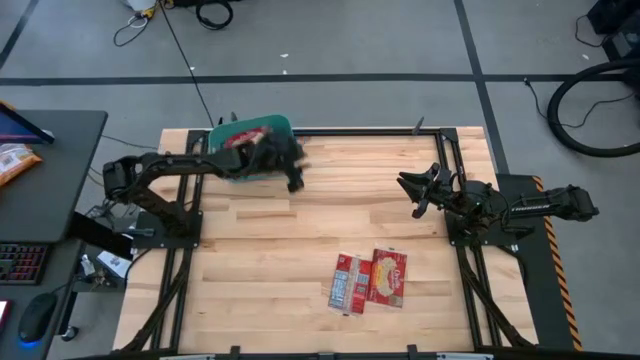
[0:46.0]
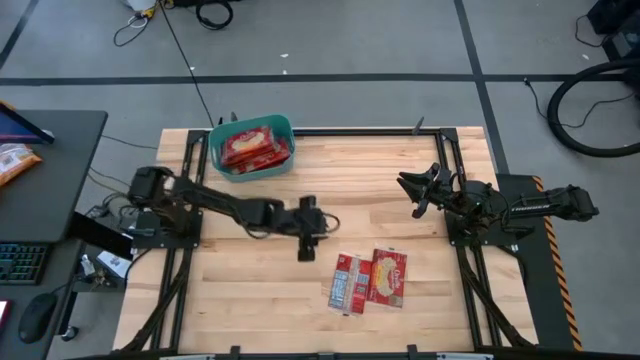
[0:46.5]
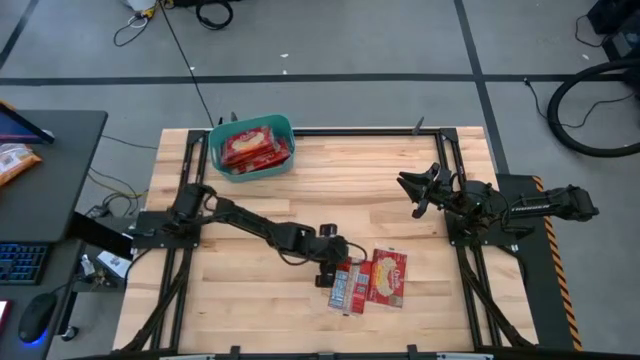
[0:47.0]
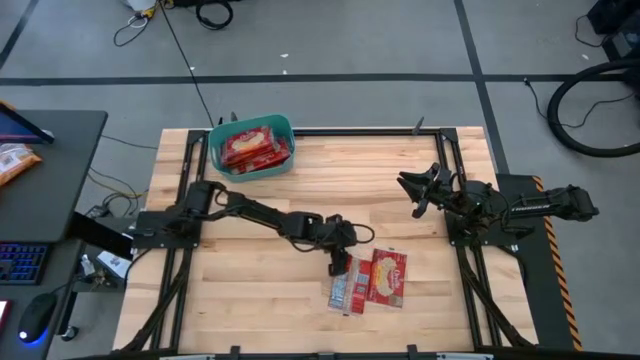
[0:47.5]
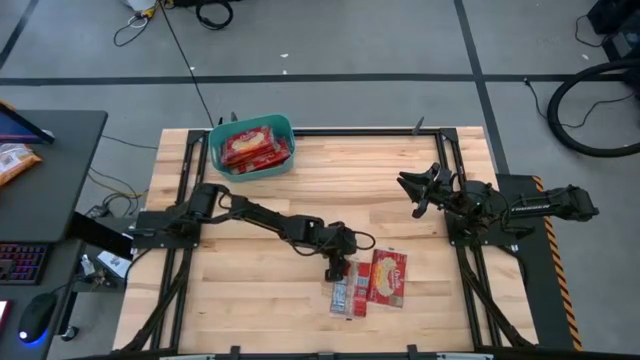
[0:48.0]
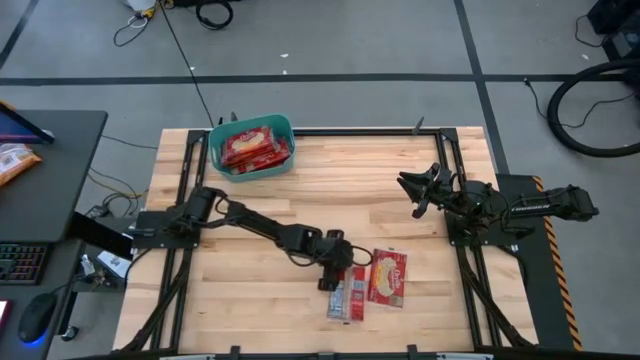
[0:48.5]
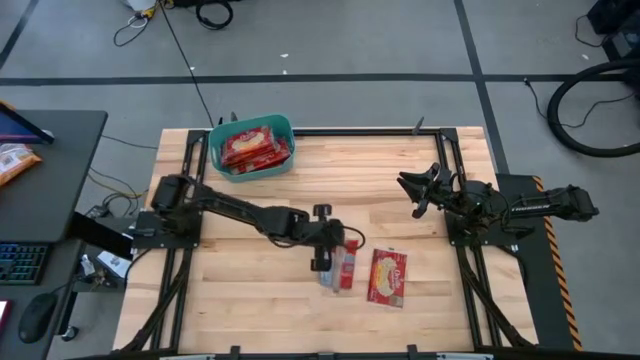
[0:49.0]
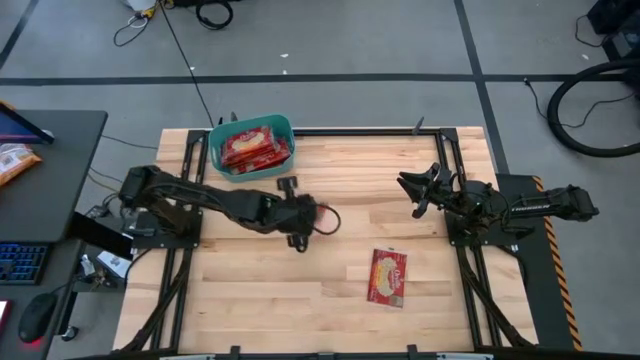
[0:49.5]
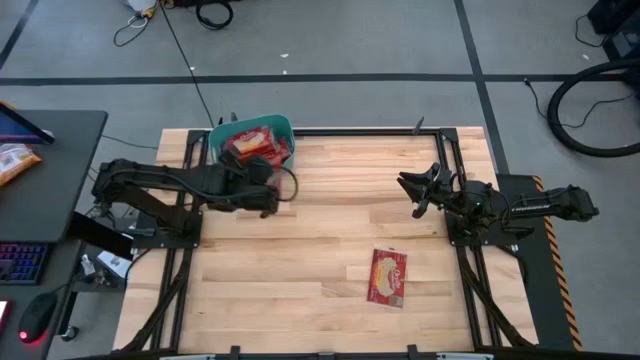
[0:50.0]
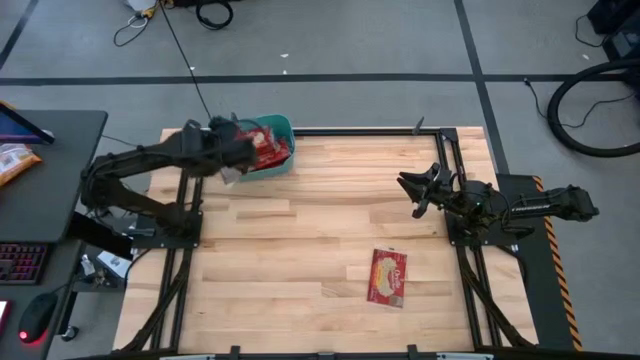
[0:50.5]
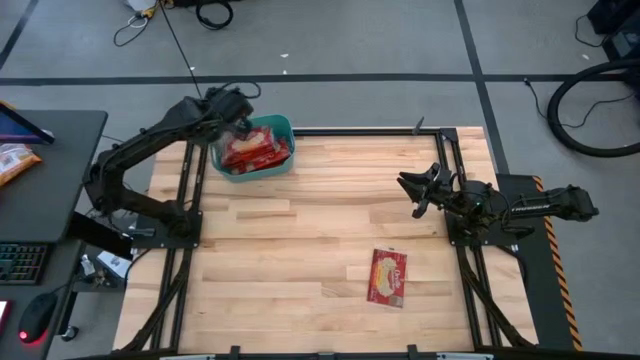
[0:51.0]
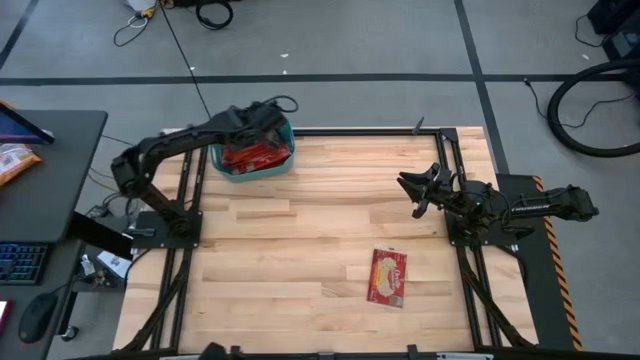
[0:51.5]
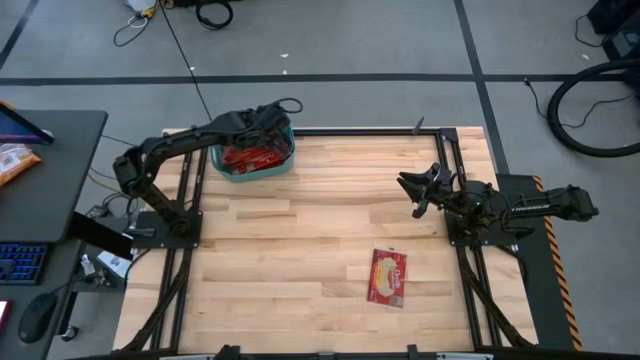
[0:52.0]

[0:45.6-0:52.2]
Task: Sort popcorn bags into baskets
Put the red popcorn bag into the blue bin

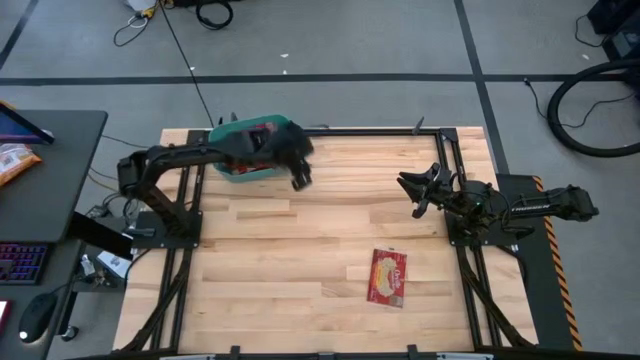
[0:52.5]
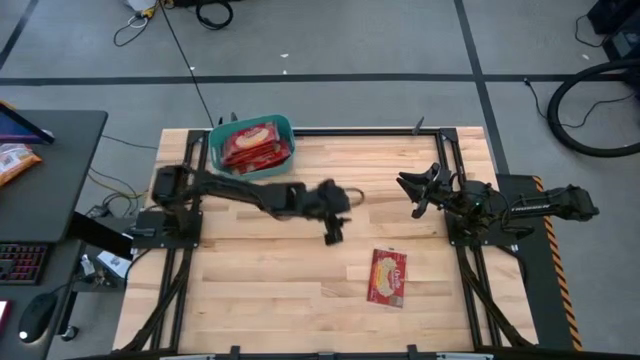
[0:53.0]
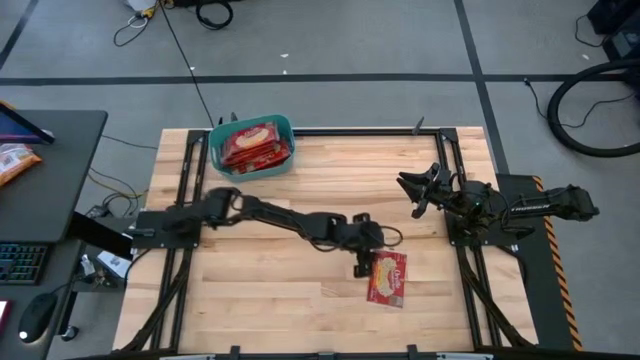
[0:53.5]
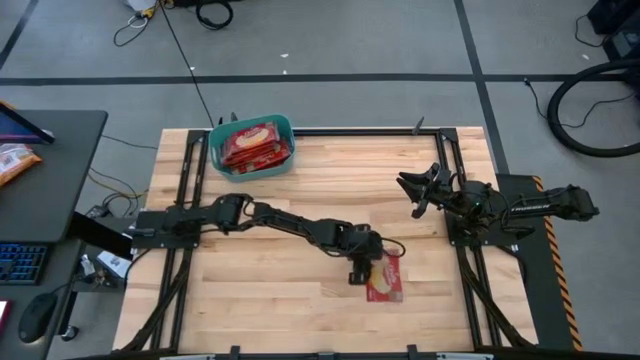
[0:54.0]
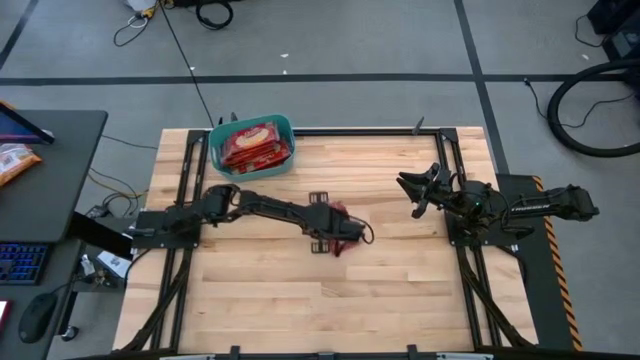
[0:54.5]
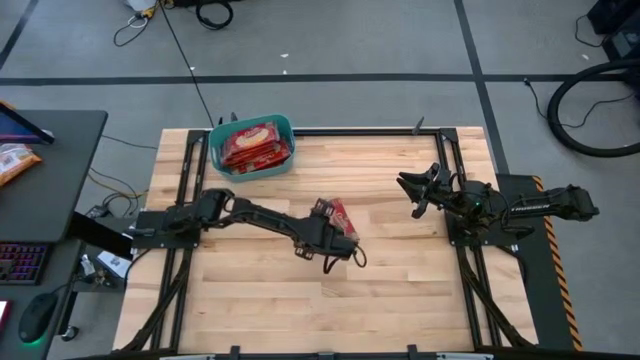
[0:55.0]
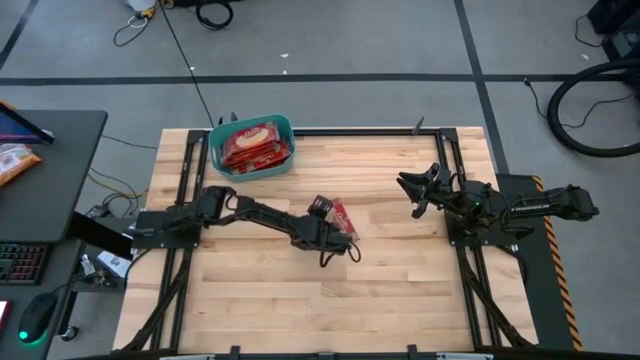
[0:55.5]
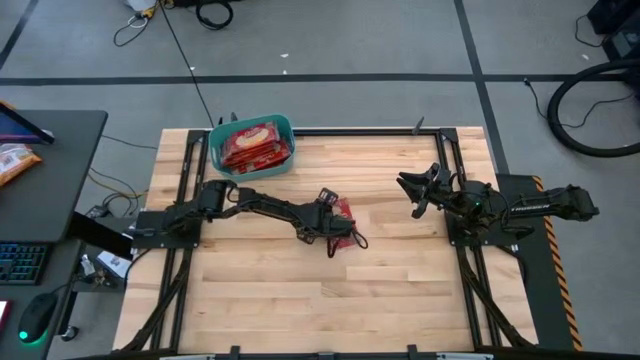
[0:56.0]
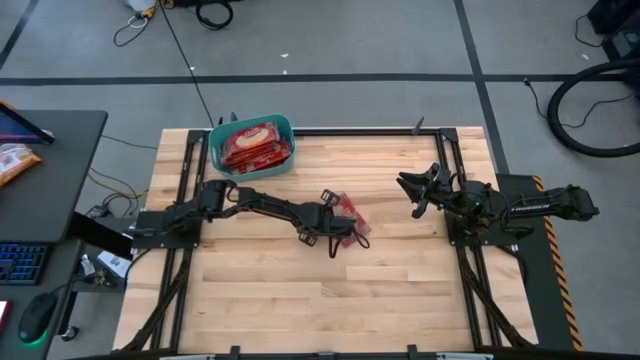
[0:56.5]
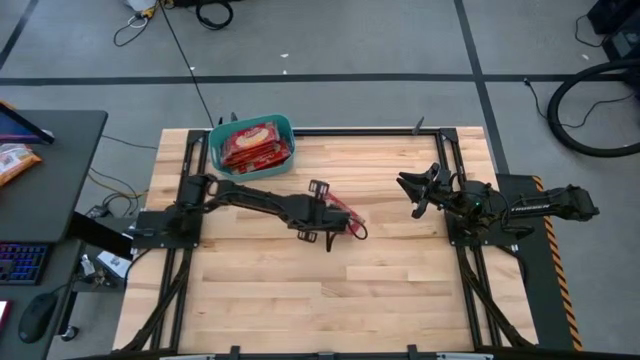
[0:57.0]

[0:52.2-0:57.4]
Put the red popcorn bag into the blue bin

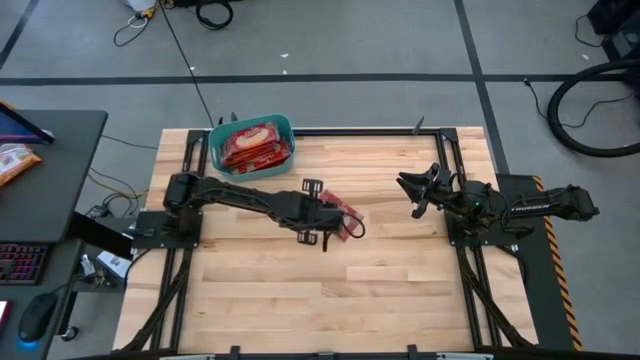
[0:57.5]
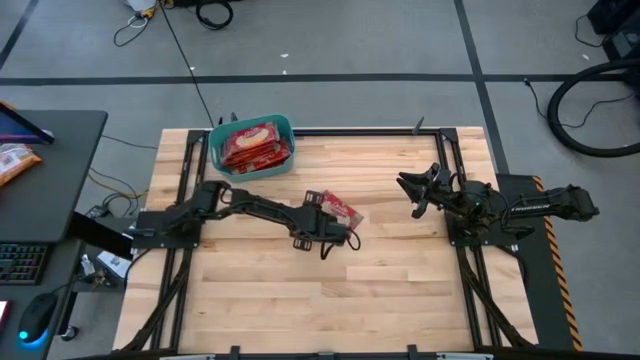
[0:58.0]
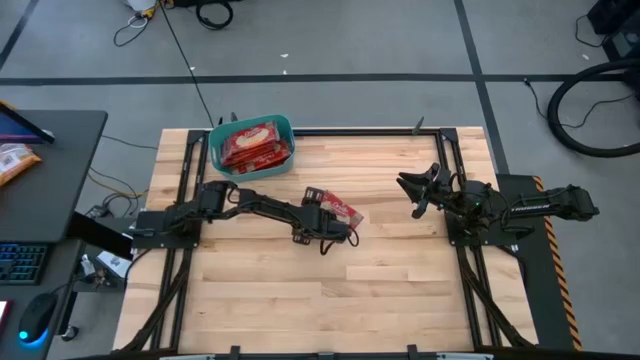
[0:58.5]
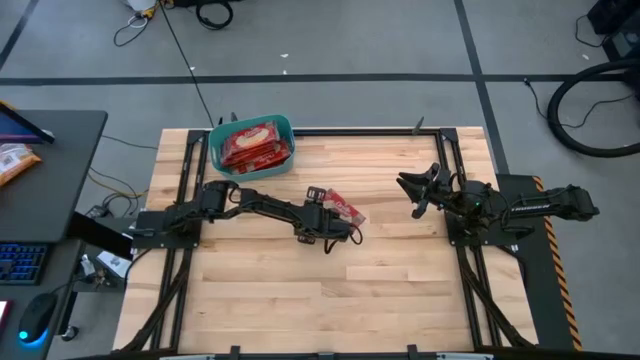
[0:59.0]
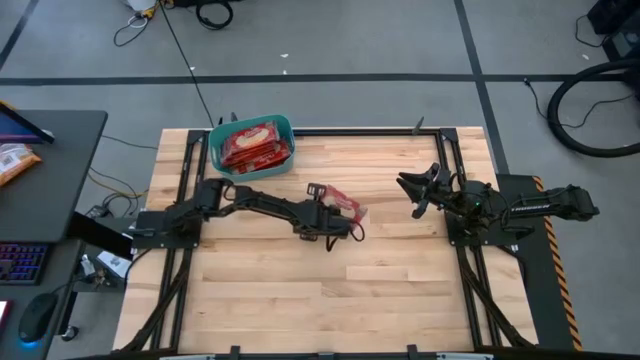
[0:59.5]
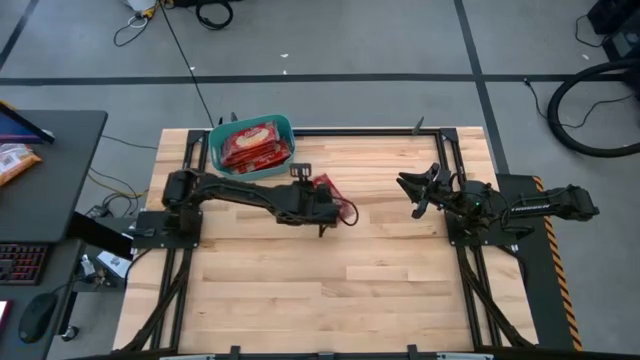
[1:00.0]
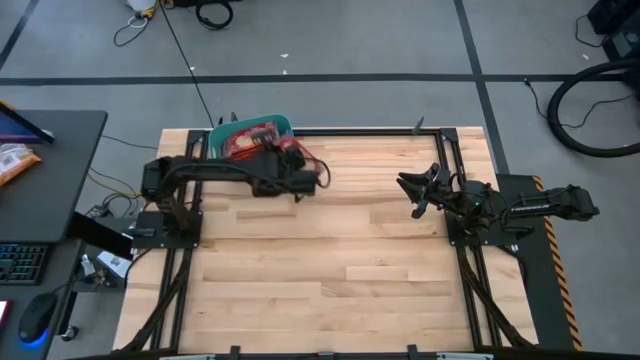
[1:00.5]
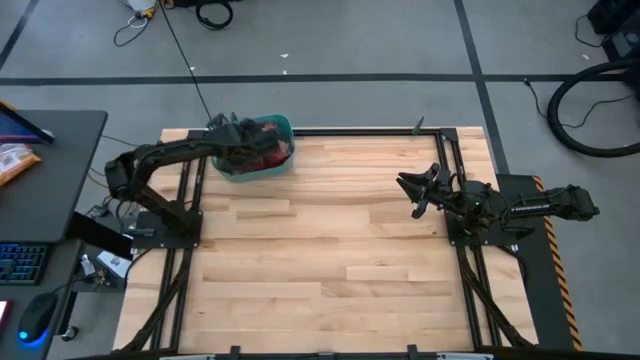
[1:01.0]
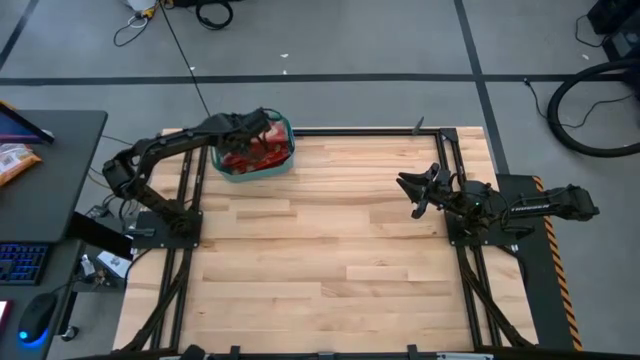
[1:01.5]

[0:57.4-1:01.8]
Put the red popcorn bag into the blue bin

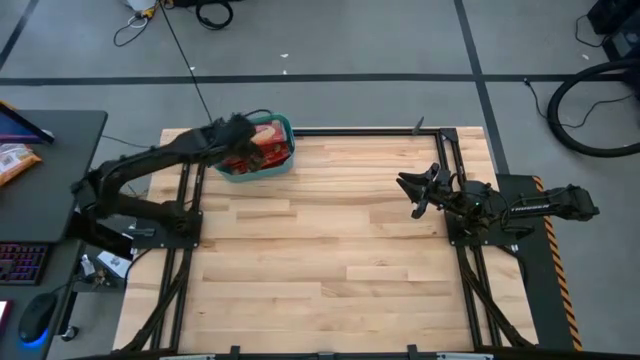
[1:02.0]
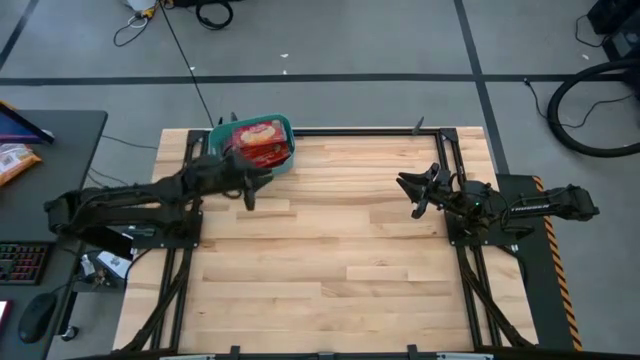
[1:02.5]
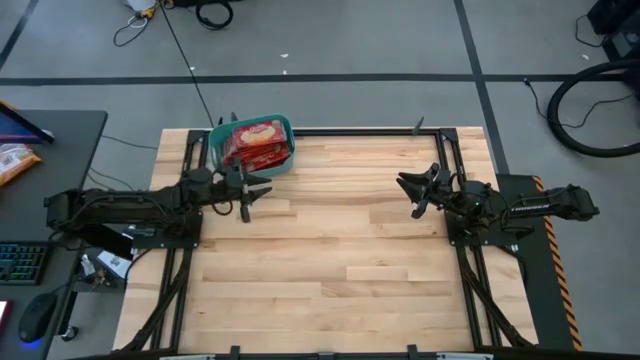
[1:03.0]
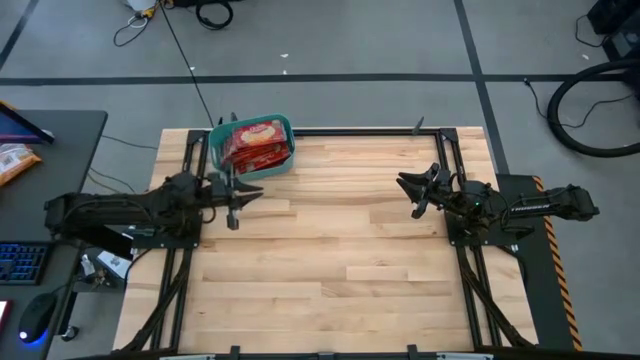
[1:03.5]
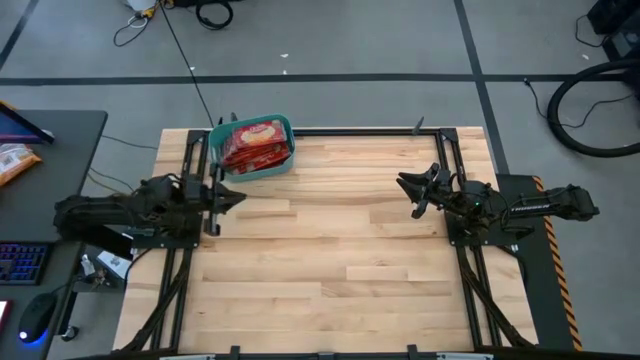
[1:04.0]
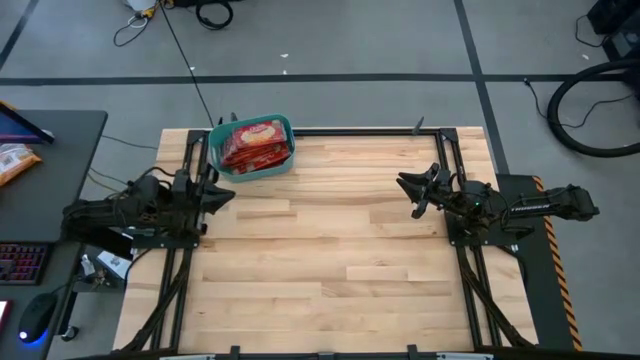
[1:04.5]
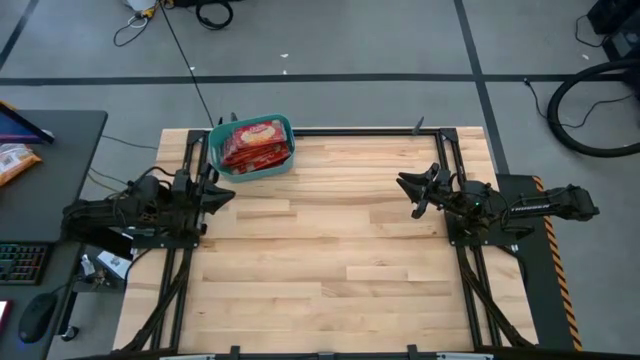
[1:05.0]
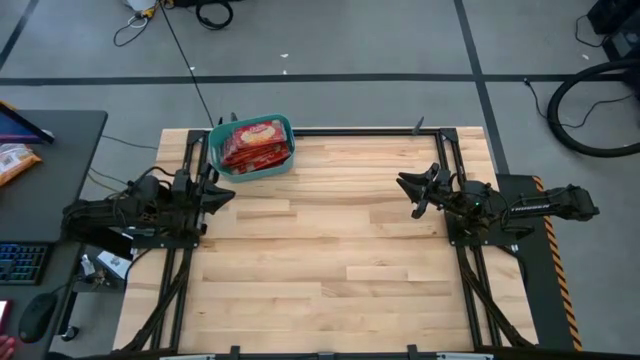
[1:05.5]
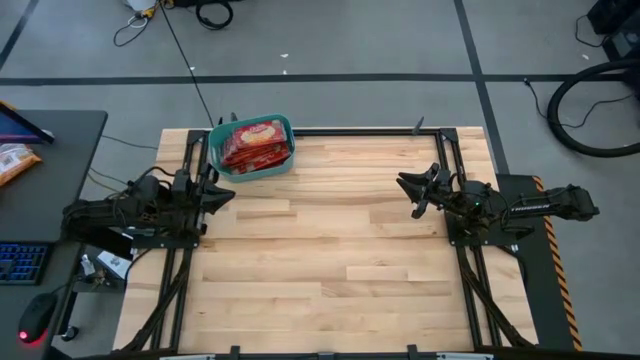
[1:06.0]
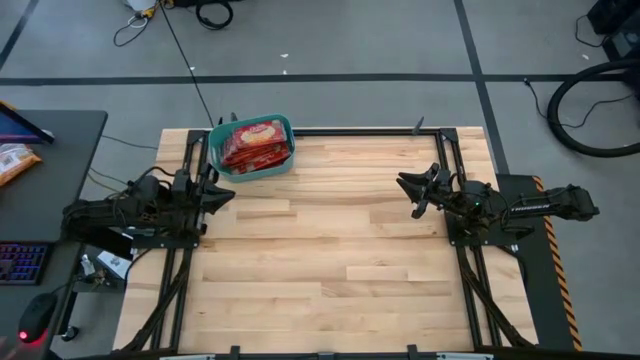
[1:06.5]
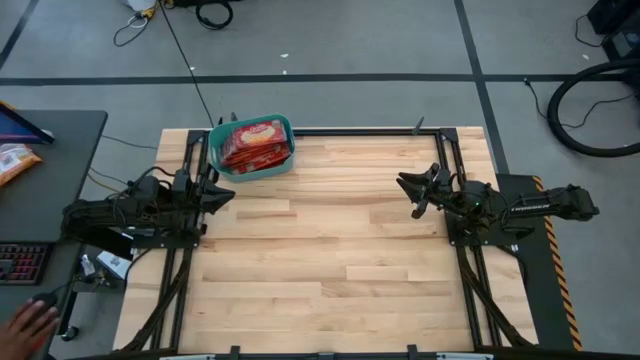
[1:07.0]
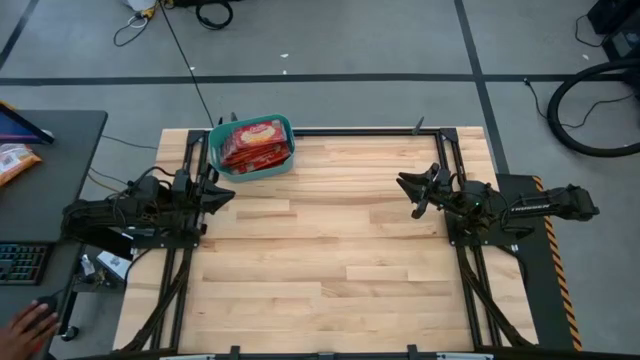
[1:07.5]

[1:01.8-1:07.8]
Return to Home Position
